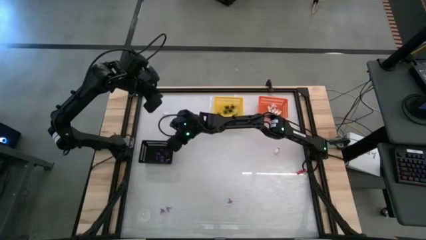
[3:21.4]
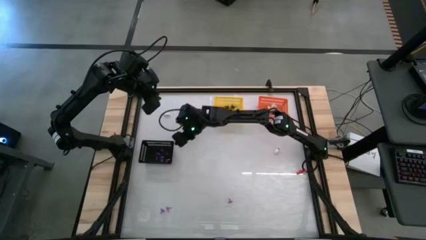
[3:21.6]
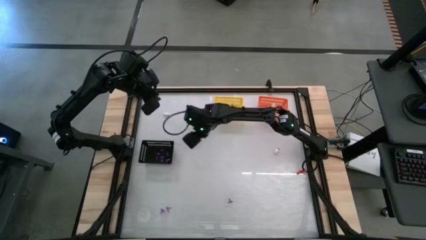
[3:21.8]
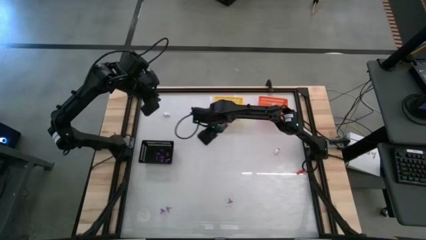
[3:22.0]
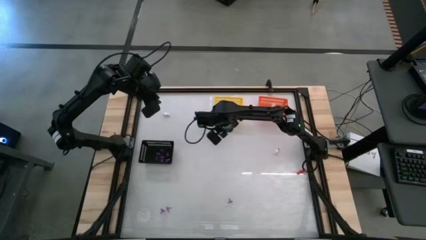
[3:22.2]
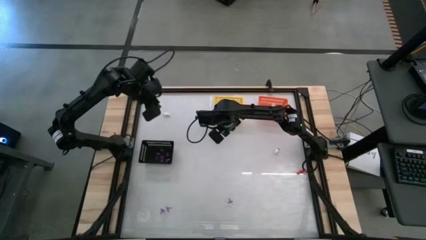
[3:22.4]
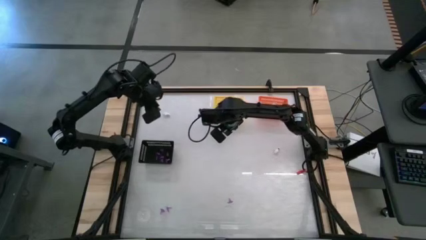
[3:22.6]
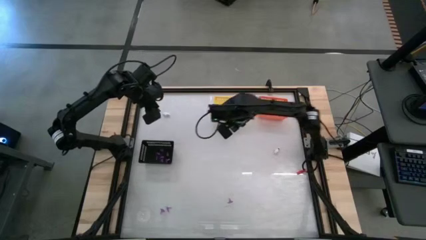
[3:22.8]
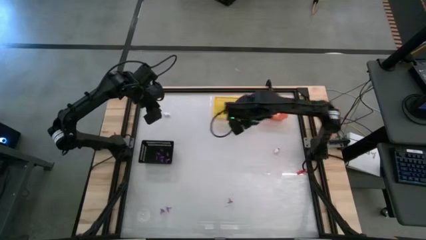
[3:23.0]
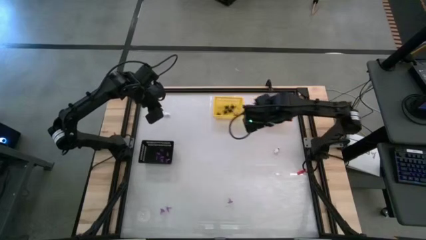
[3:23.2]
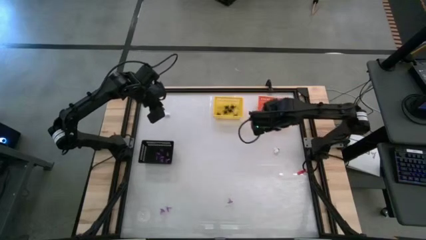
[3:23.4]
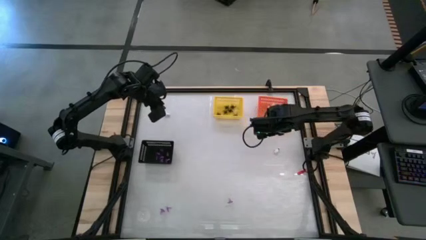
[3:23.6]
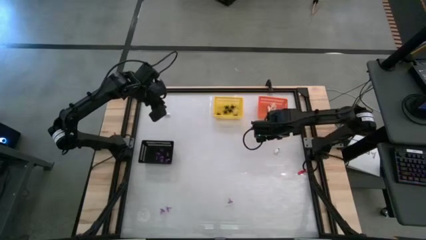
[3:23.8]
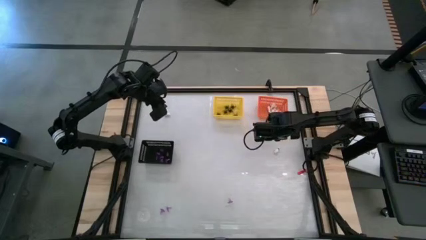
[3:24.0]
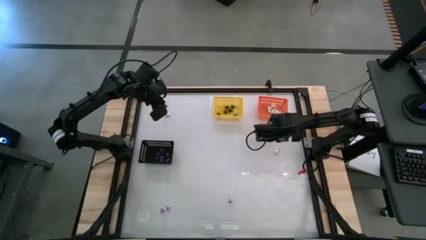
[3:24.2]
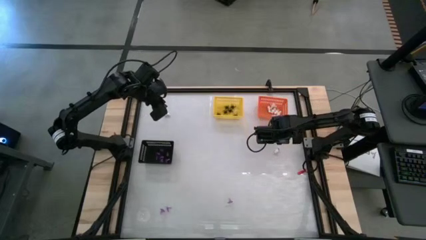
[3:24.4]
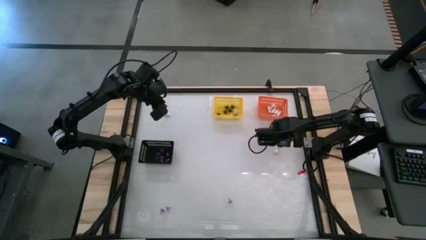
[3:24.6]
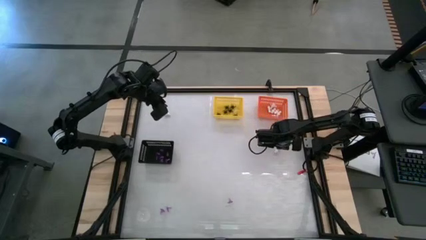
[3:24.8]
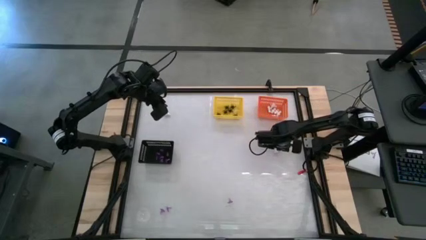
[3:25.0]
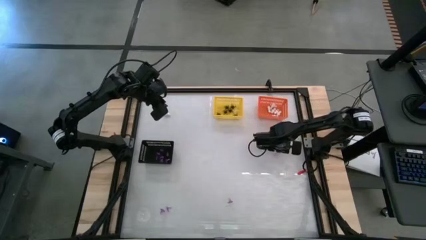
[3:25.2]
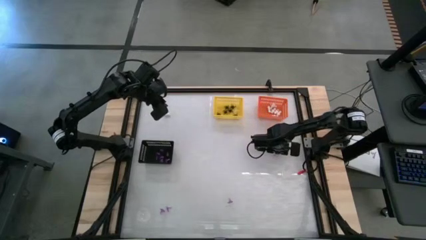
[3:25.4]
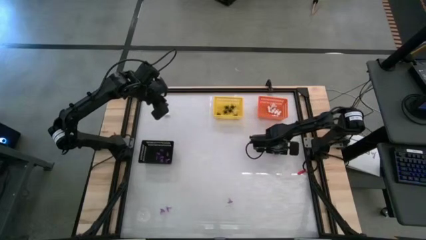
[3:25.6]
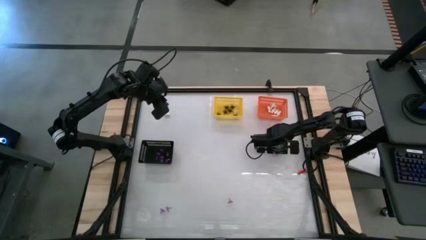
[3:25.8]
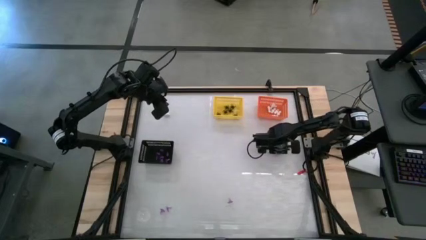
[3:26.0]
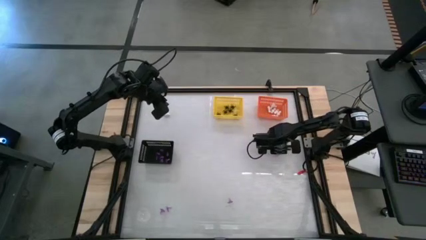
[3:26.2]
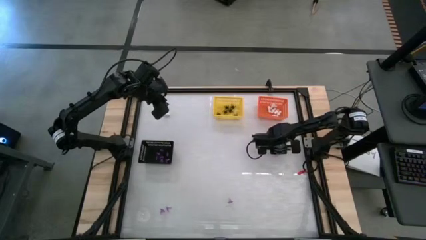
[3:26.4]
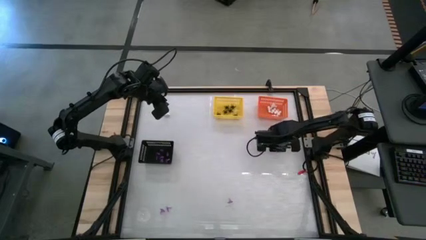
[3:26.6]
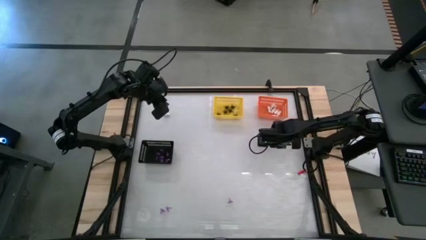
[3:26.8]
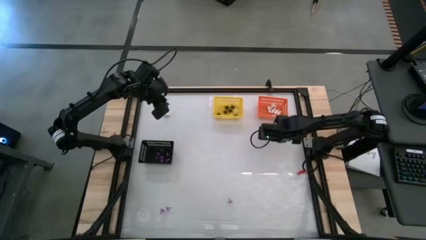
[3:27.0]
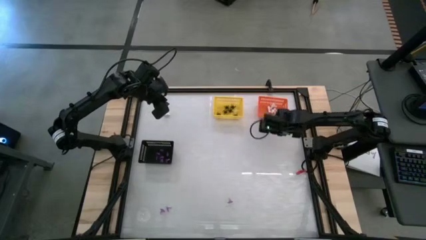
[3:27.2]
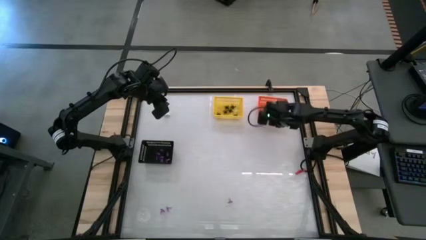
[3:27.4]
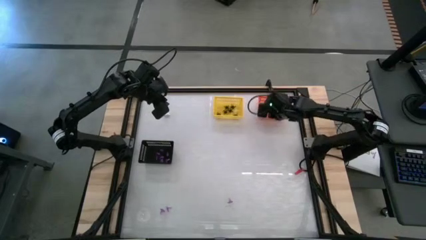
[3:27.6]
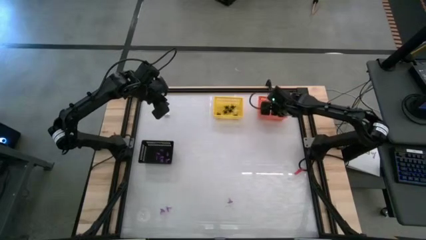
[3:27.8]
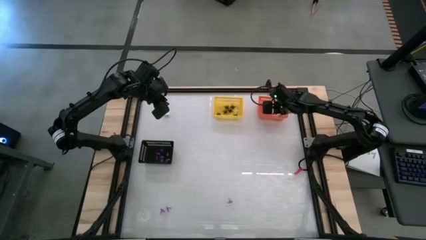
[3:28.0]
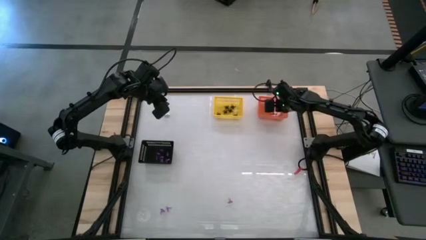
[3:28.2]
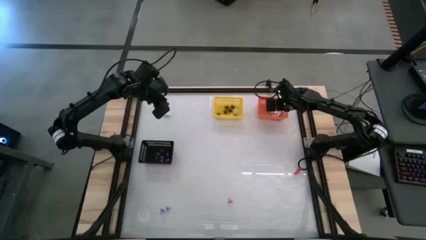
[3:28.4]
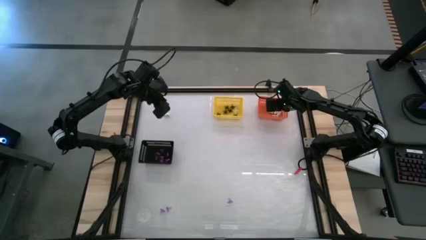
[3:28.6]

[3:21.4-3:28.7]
Task: Sort Halloween decoration
Put the white skeleton toy into the orange bin

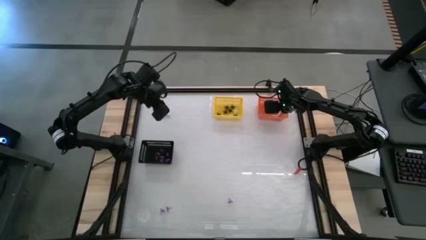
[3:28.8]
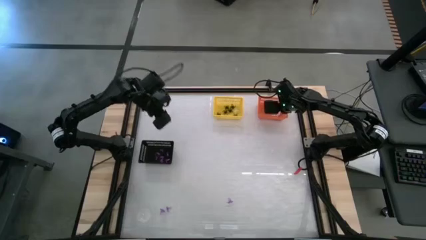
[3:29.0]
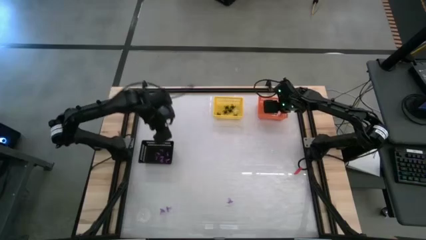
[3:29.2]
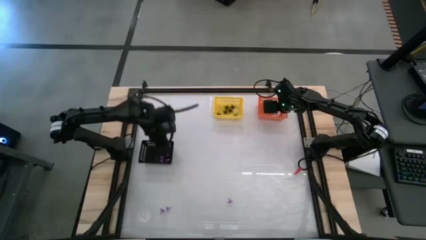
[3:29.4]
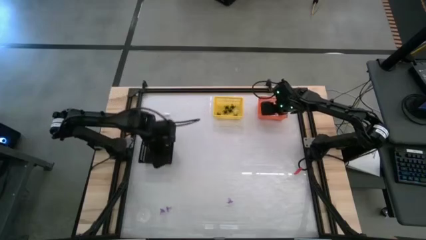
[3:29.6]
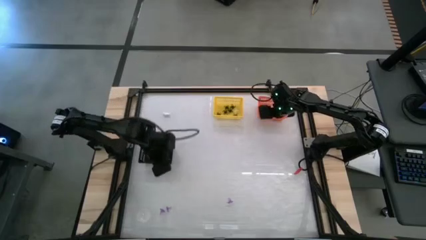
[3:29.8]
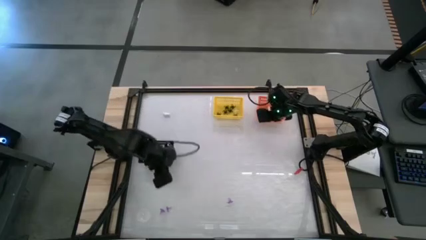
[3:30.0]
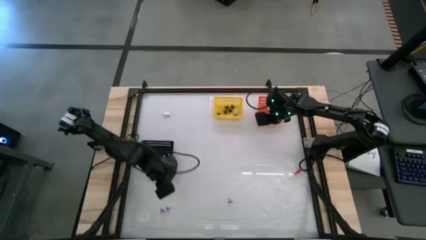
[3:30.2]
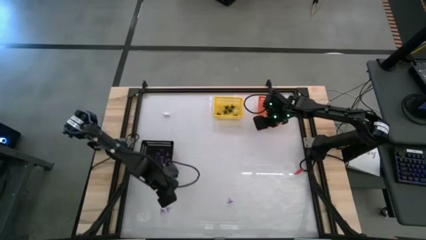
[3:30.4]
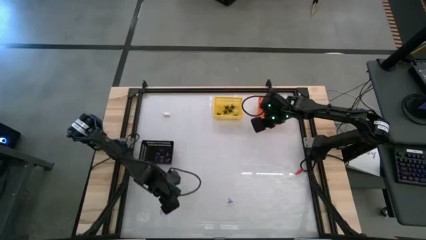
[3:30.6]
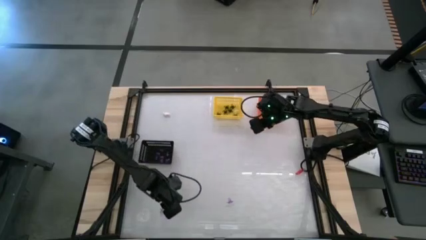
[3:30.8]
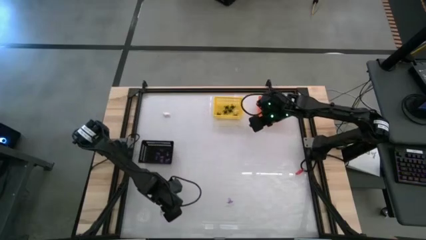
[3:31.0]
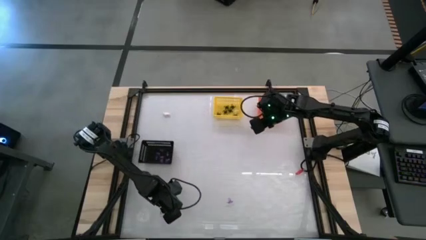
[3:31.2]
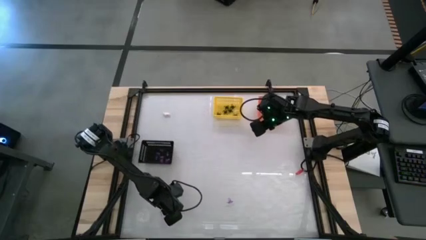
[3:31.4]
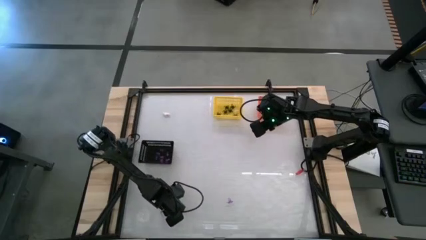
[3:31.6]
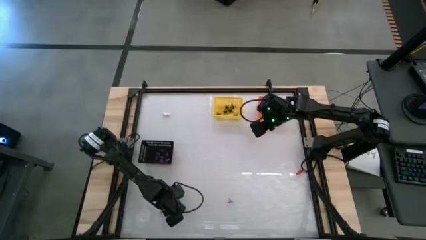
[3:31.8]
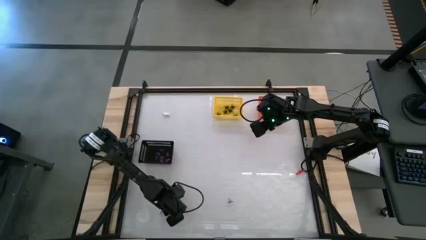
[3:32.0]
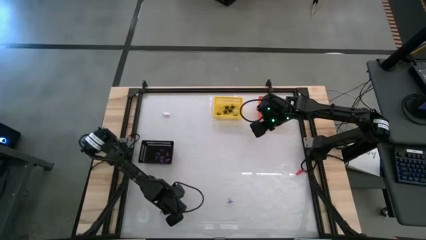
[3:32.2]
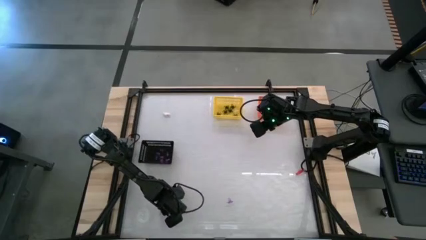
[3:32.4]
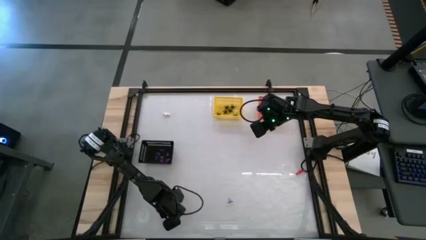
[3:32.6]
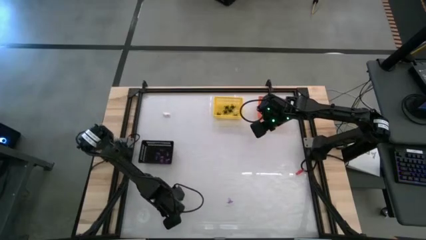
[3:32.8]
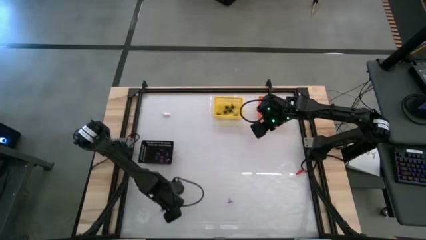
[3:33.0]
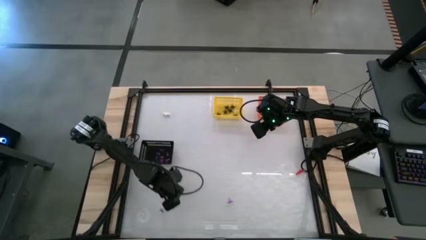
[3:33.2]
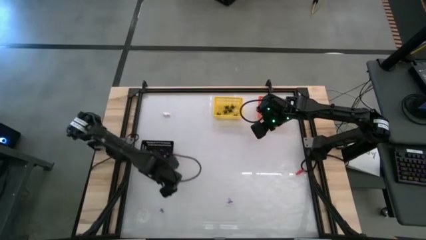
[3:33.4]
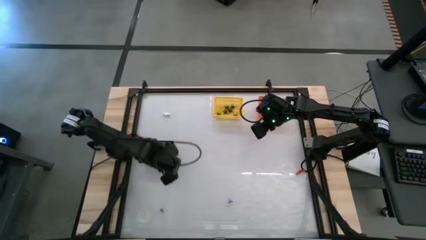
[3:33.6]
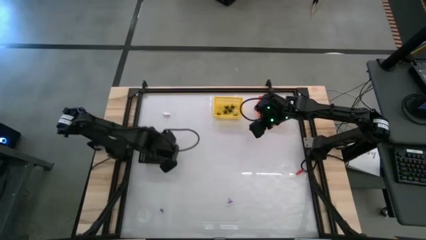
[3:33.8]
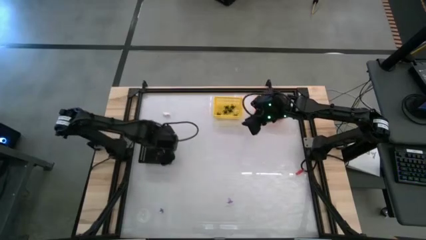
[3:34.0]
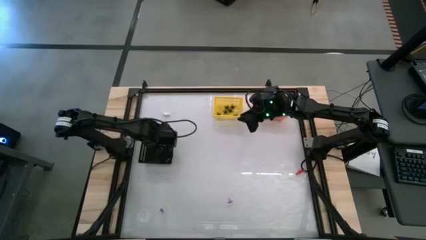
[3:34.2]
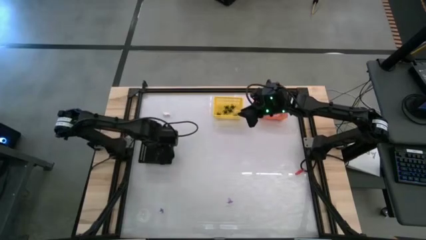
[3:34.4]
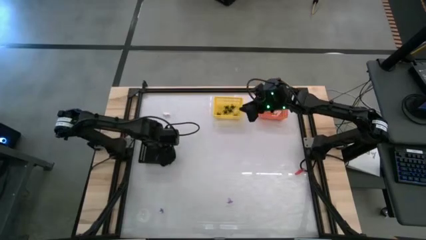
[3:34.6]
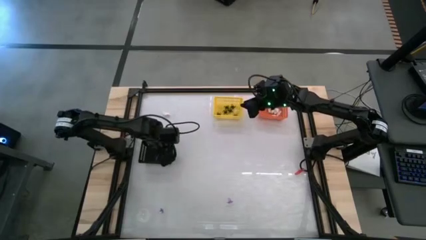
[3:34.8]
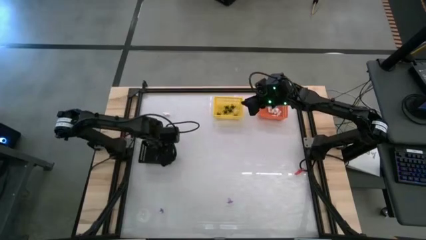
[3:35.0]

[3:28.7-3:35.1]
Put the purple witch hat toy into the black bin

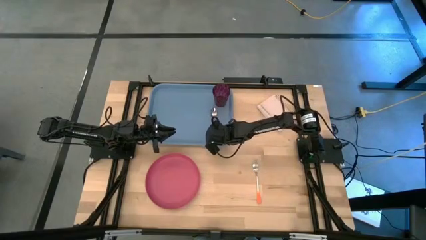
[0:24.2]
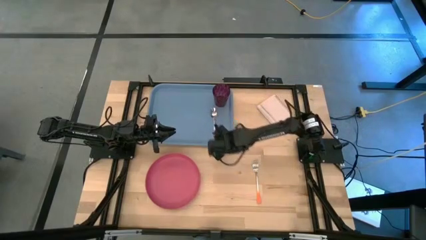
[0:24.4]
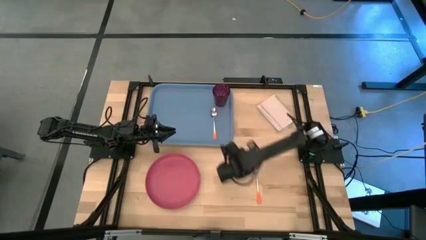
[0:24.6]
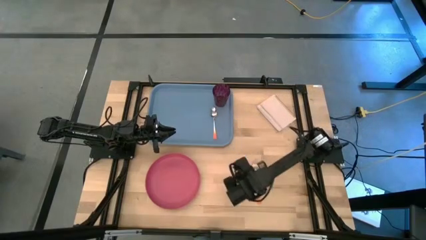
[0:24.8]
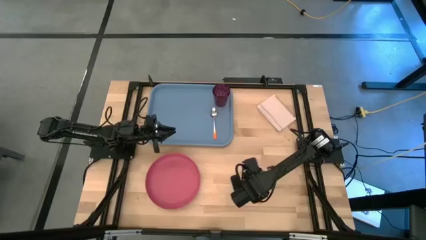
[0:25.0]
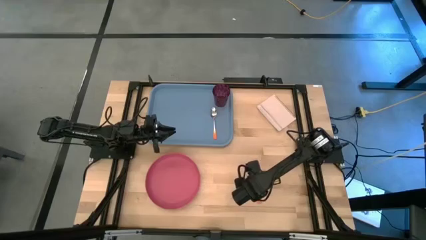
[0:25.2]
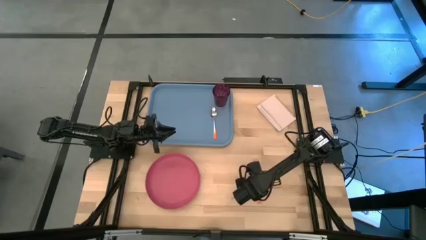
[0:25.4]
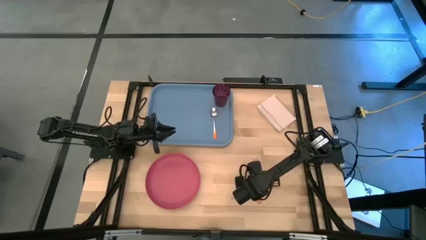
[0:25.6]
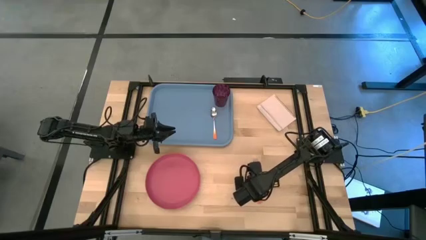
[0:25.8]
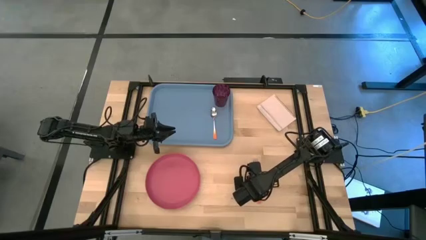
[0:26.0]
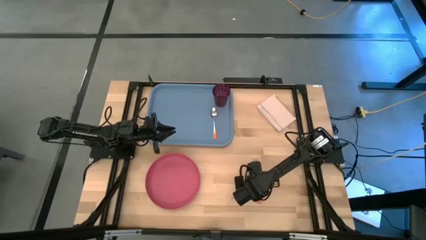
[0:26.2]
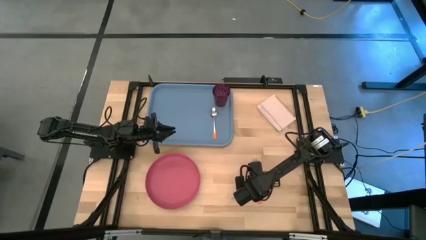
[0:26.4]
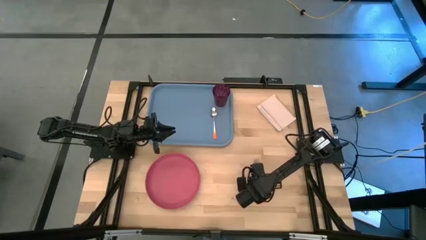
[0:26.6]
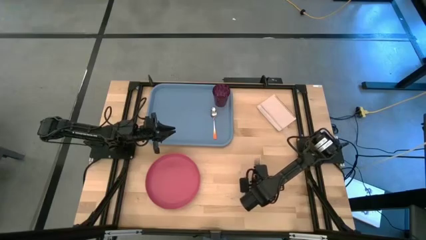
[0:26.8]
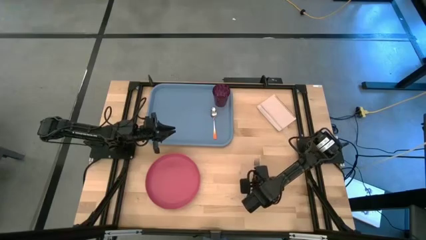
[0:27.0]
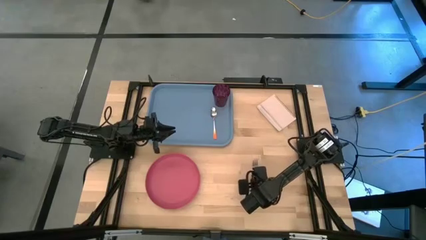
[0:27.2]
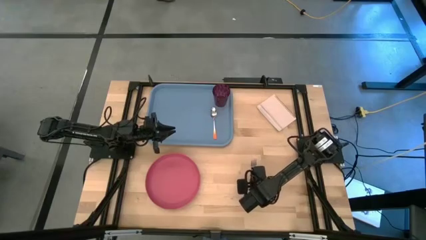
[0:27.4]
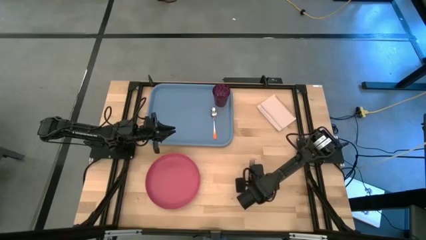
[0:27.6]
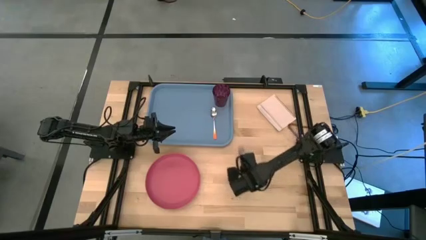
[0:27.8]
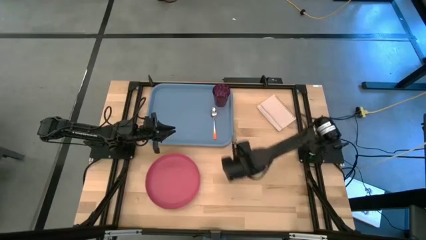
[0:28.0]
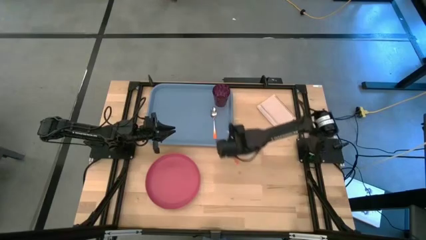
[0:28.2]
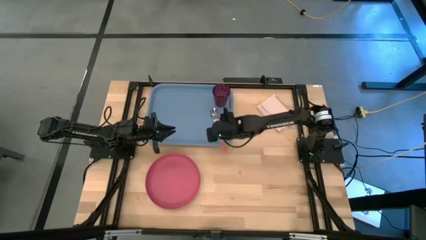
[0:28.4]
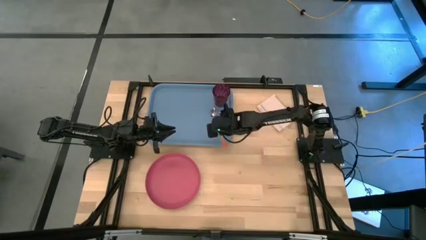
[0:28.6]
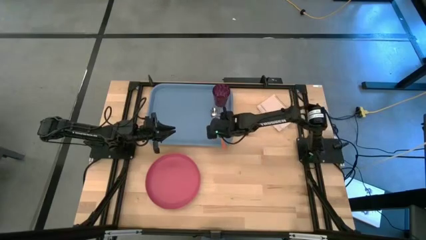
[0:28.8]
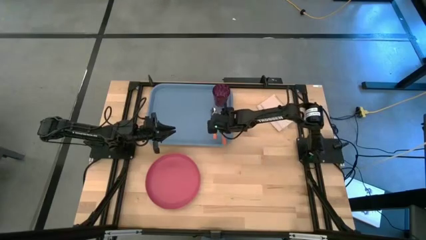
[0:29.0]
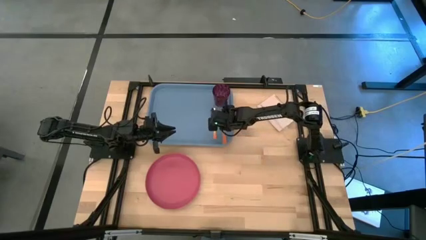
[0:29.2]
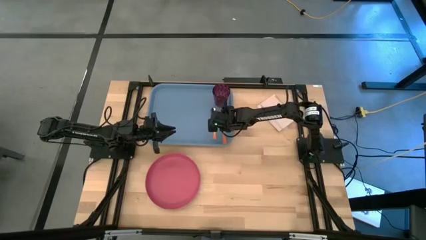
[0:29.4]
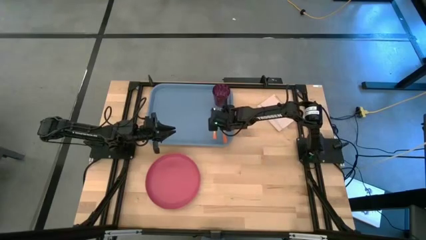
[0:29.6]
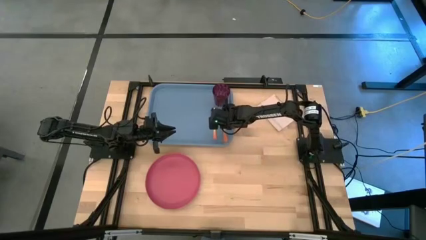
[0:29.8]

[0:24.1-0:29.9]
Task: Pick and place plate/cup/fork/spoon on tray
Put the orange fork on the left of the spoon on the blue tray
